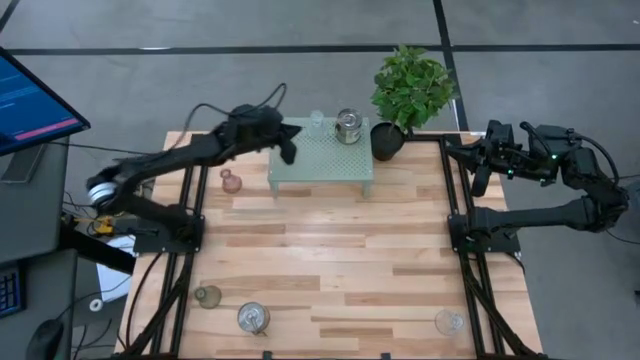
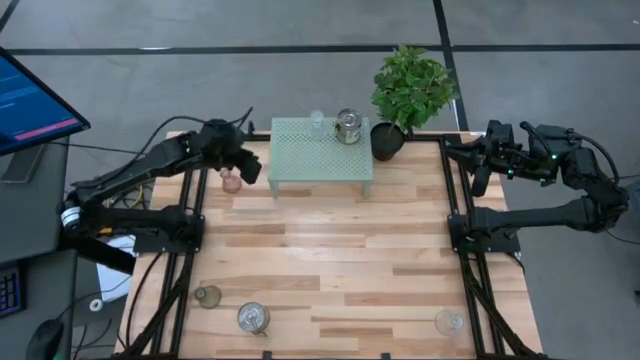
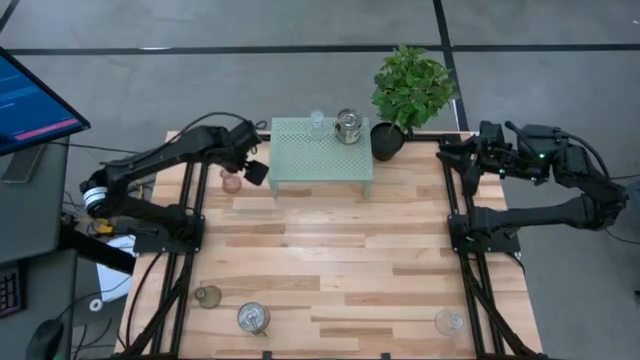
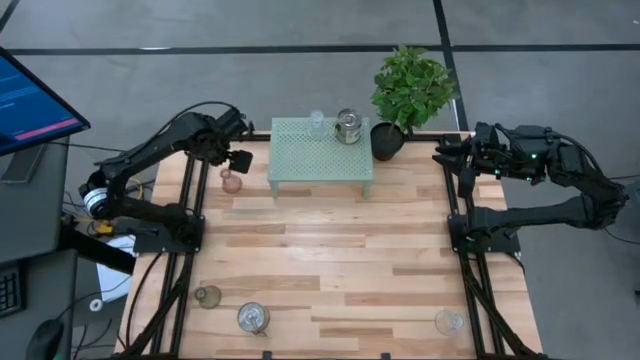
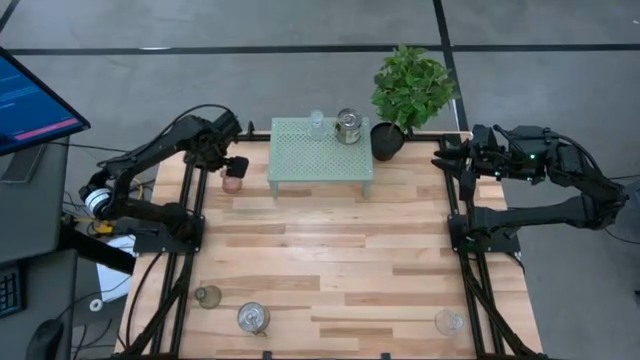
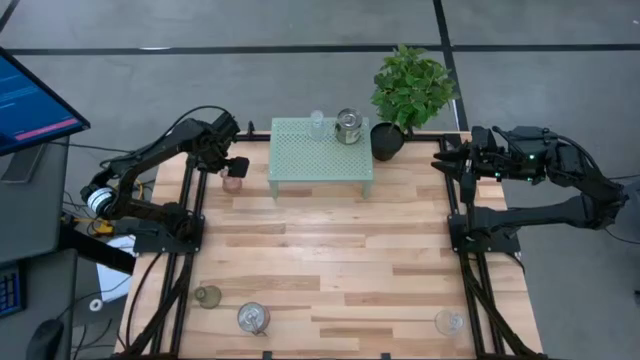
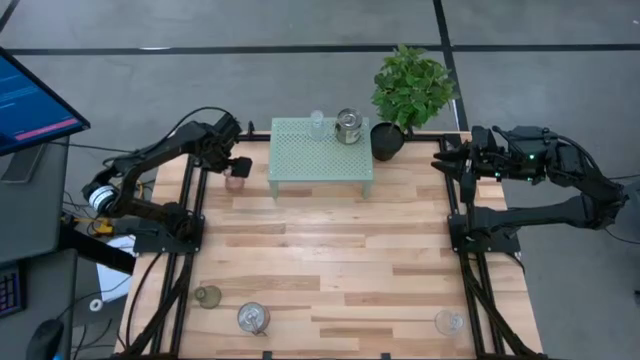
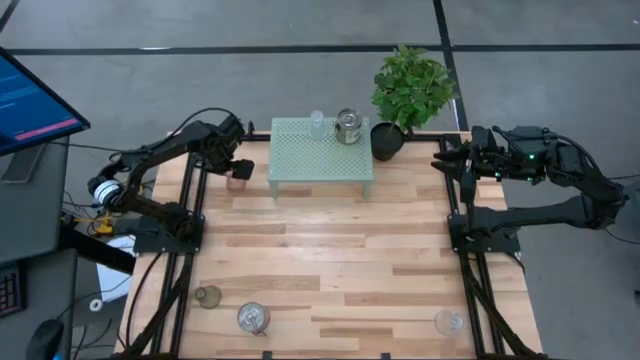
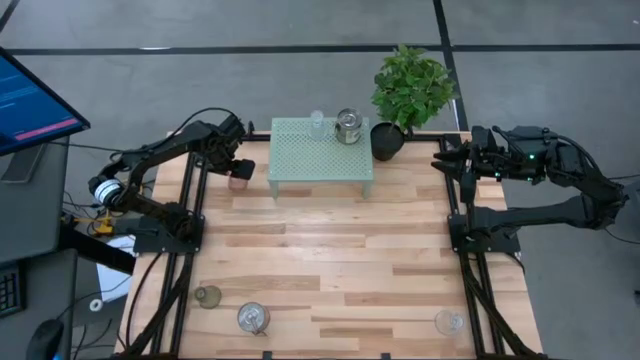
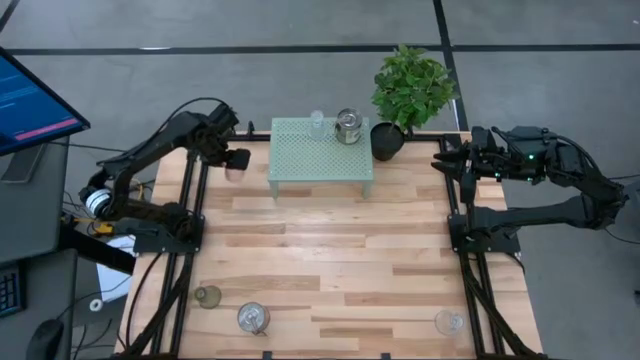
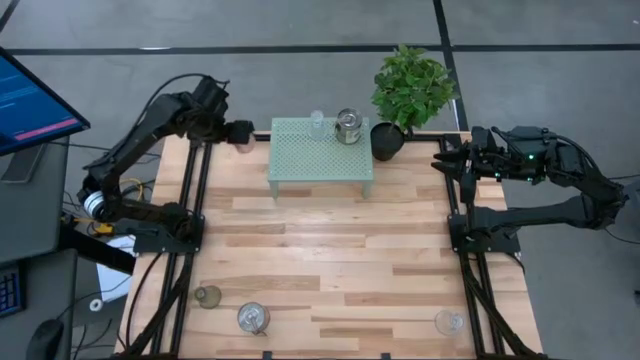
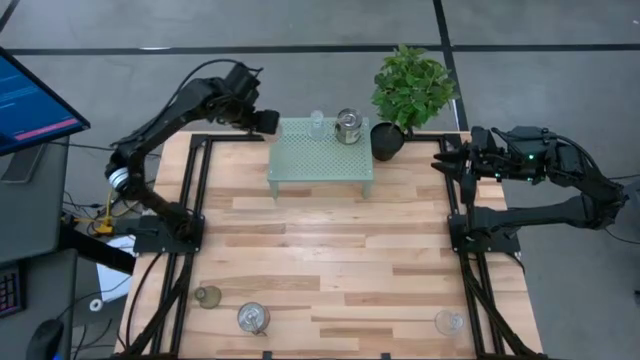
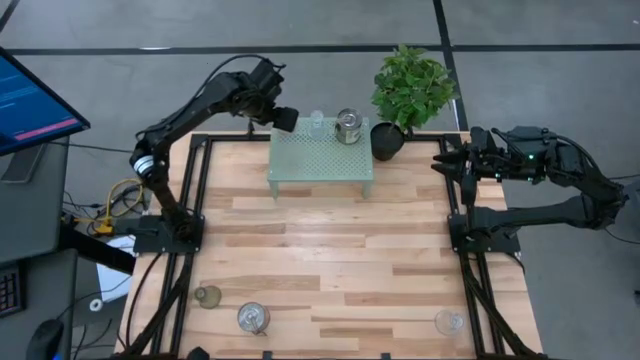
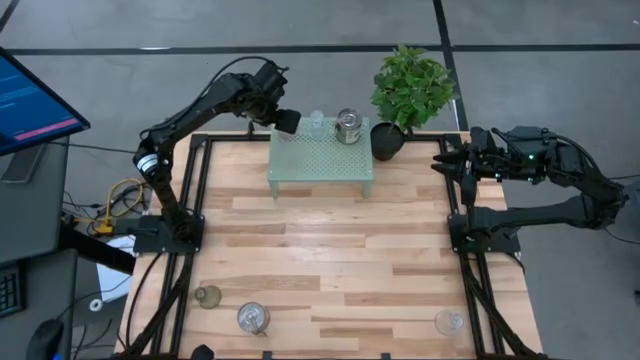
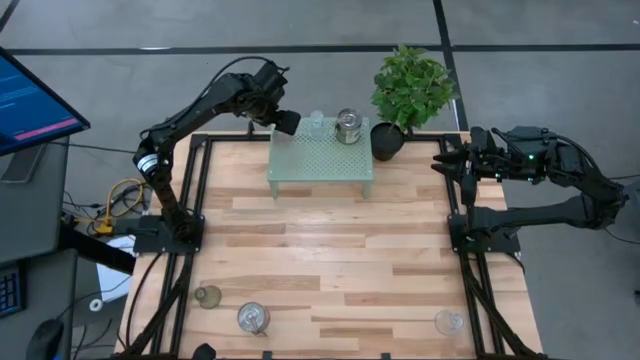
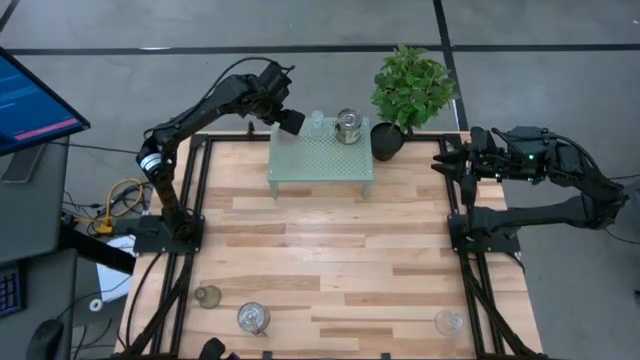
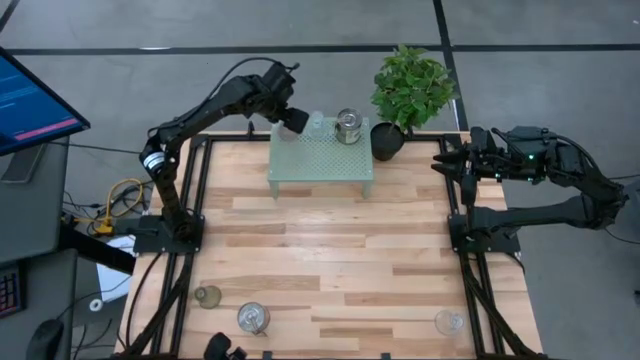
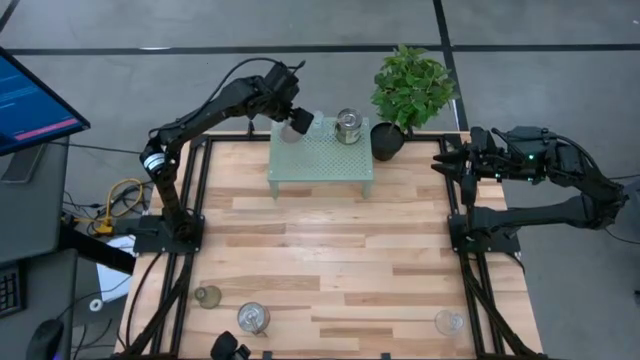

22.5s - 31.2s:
Task: Pick & Place candle stick holders
Put the top pink vase on the shelf

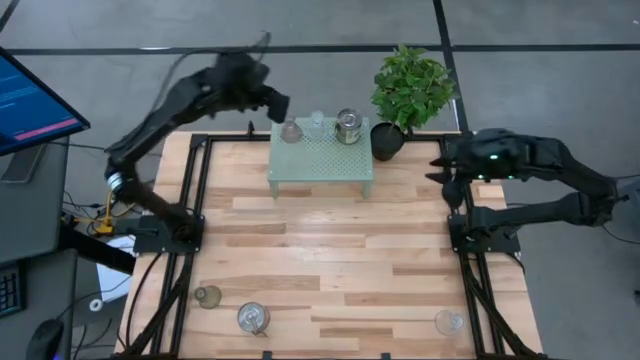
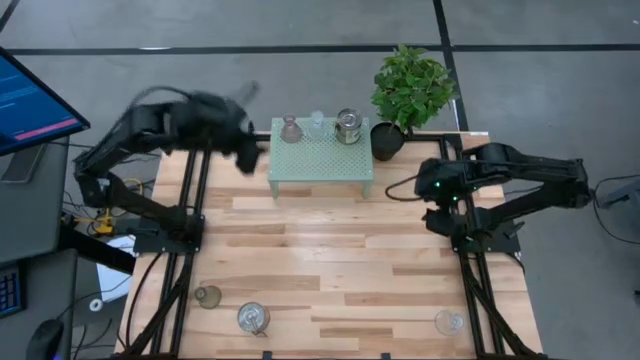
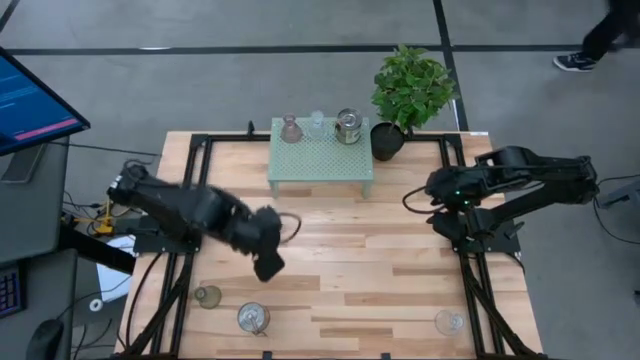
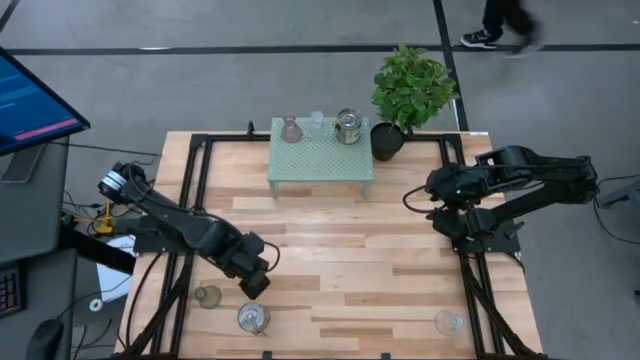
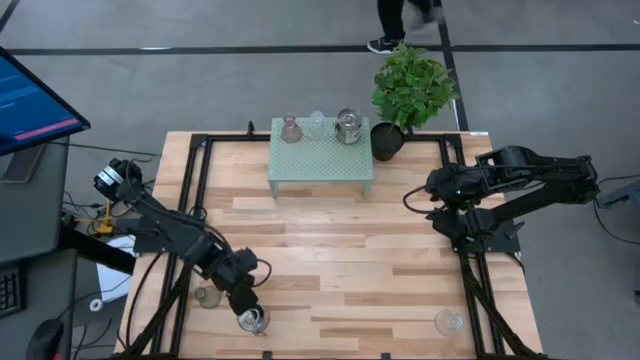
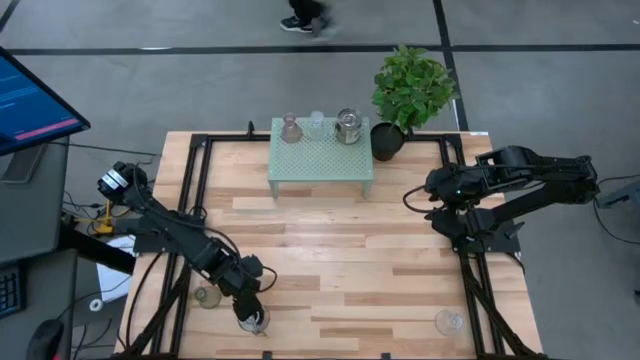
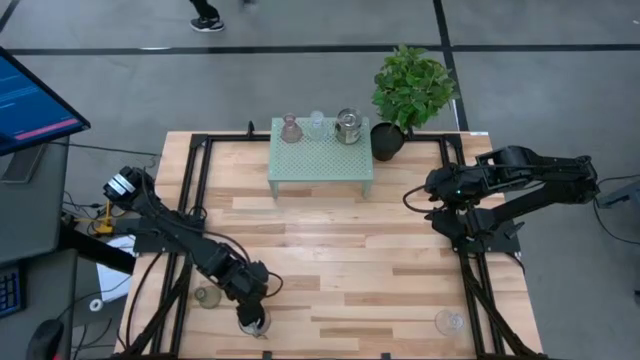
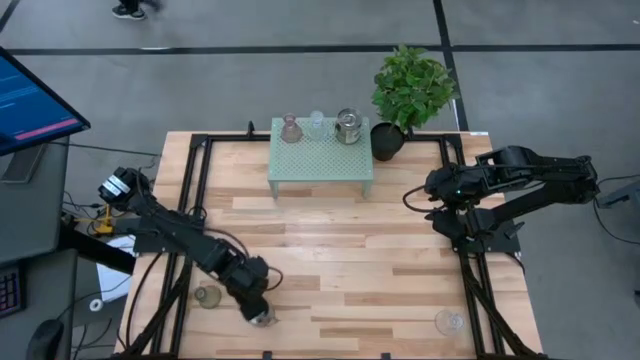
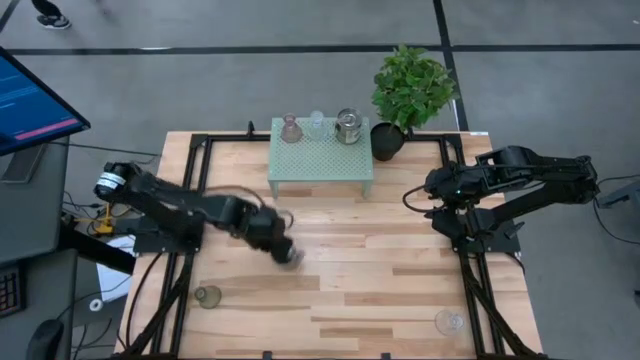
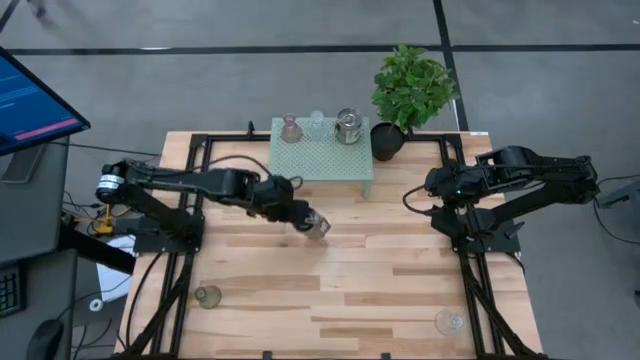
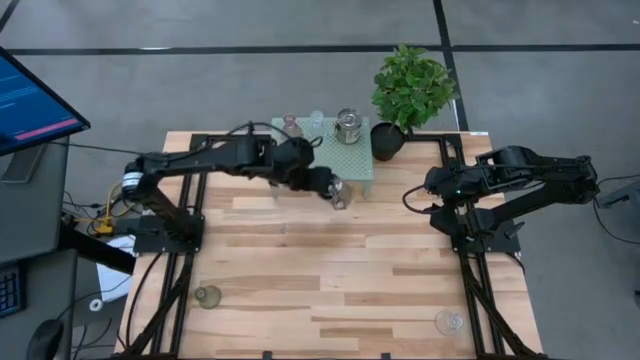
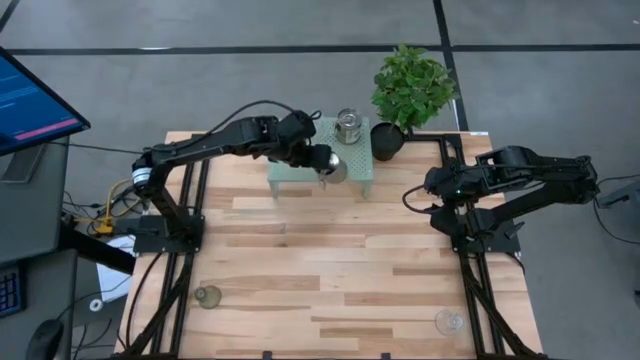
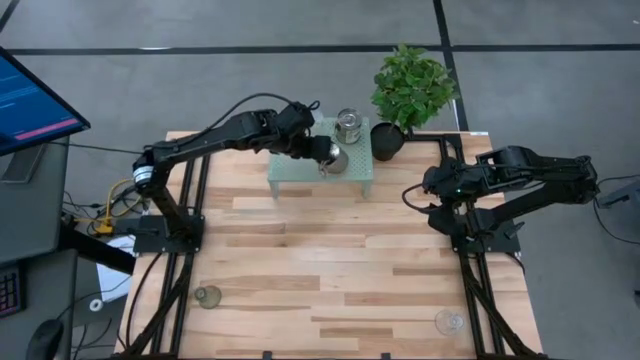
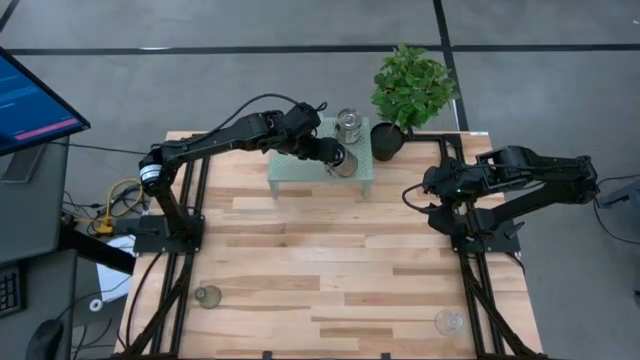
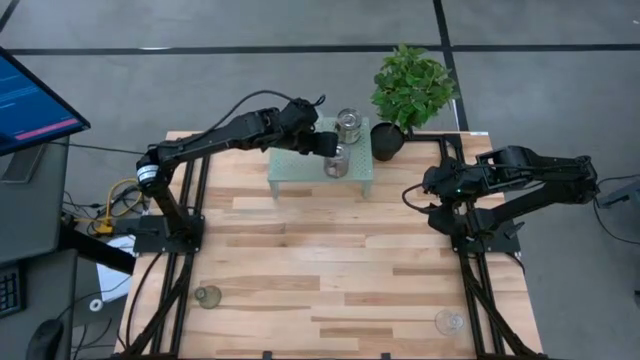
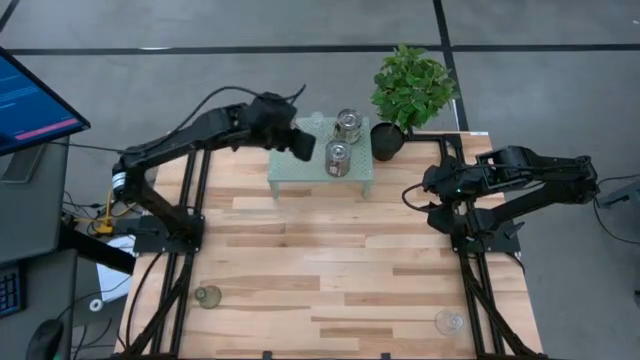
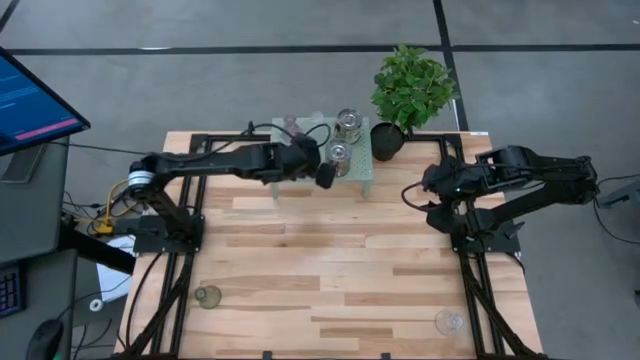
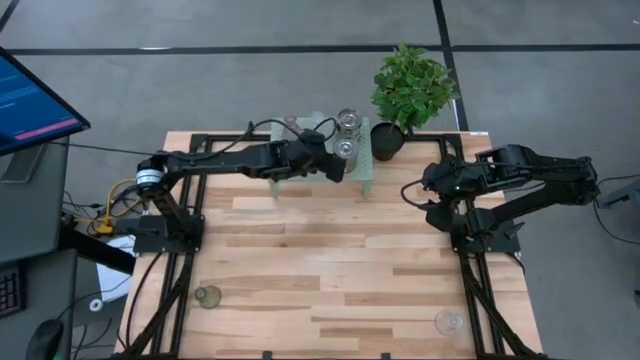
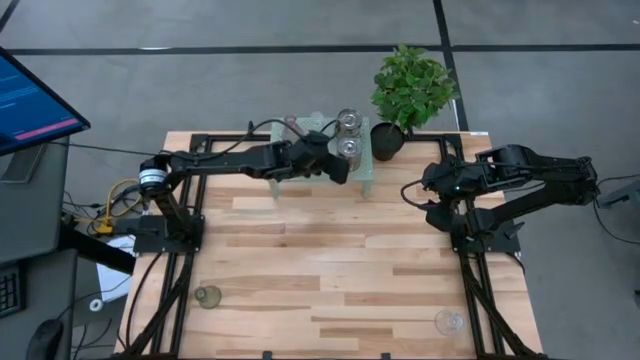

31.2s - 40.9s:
Put the scented candle on the shelf

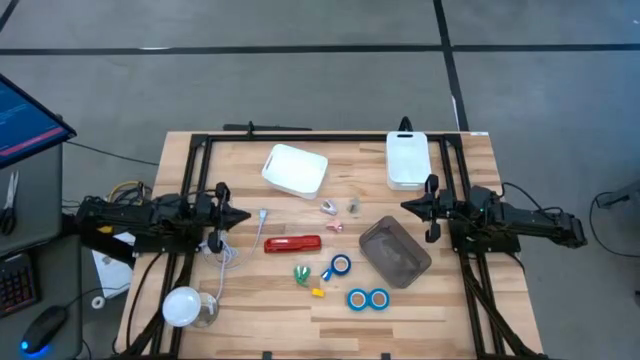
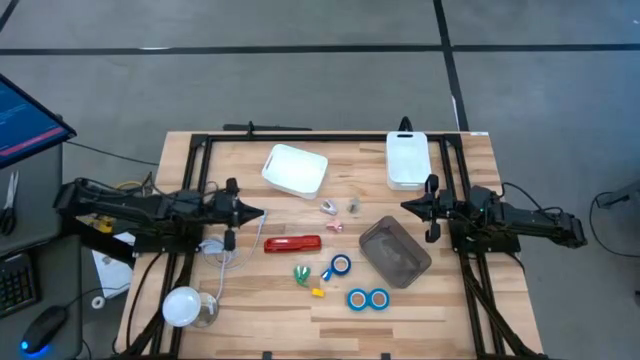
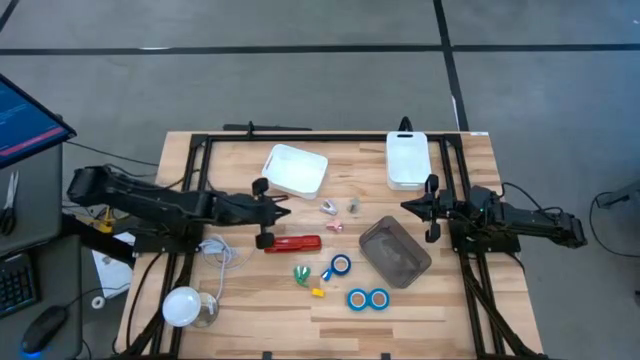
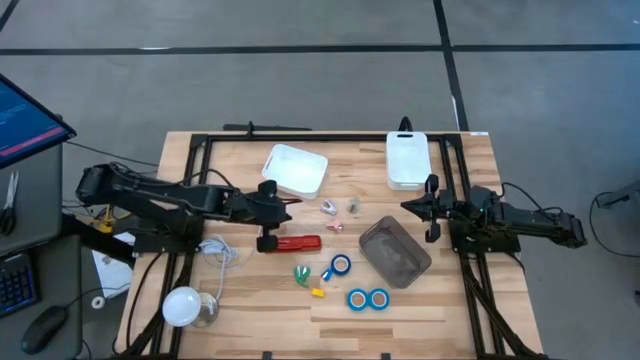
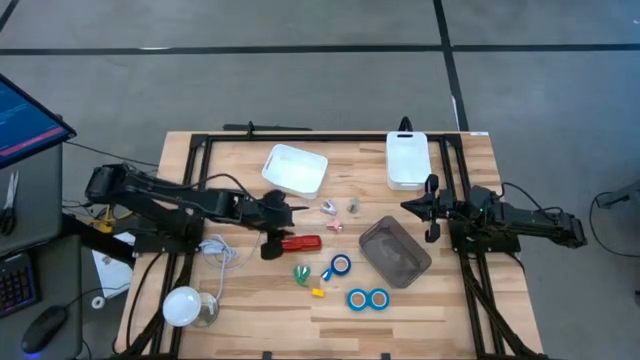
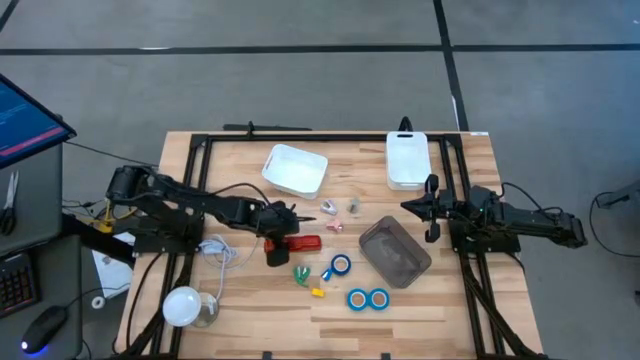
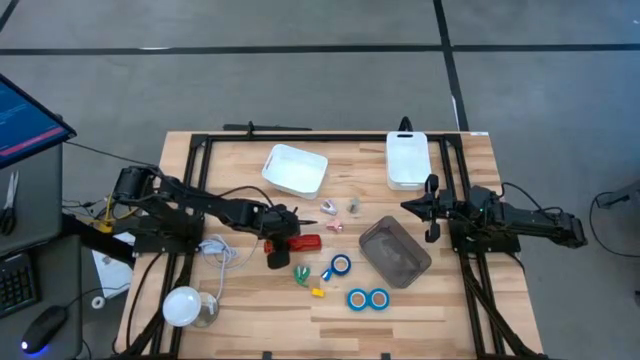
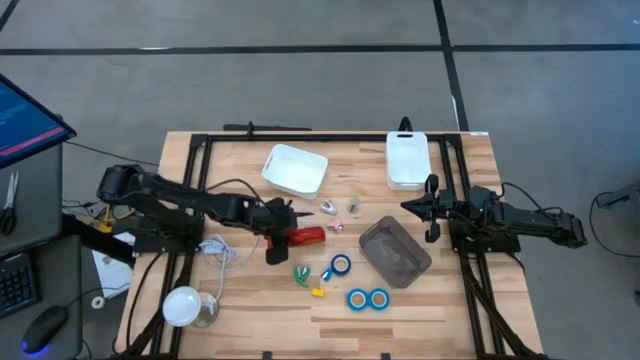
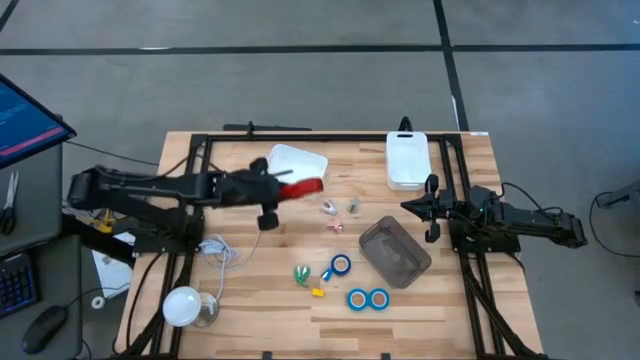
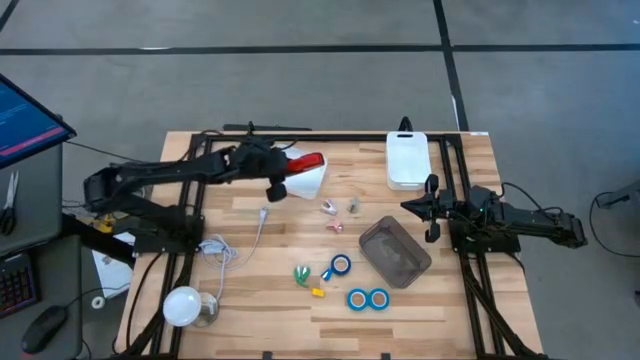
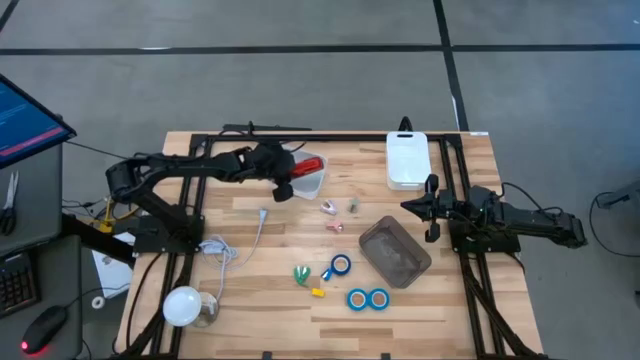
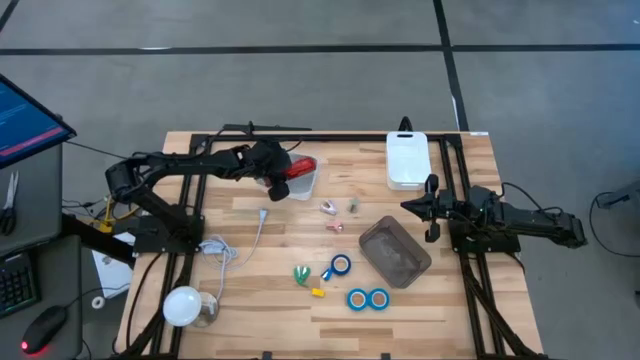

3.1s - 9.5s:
Task: Pick and place Stapler, Stapler remover, tape
Put the large red stapler into the left white bin
